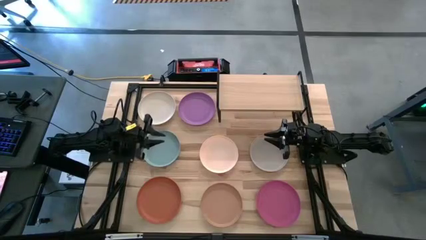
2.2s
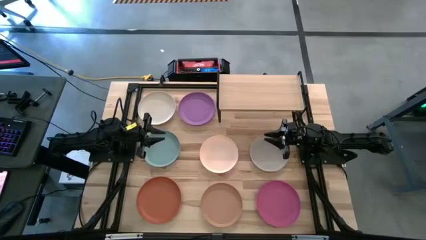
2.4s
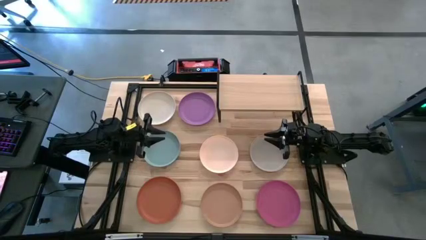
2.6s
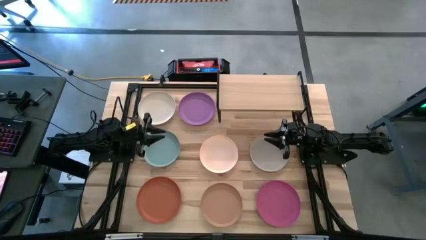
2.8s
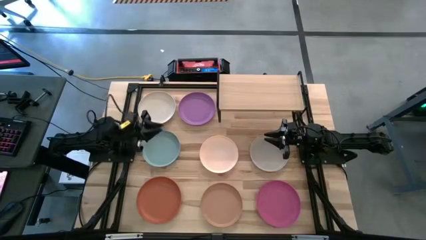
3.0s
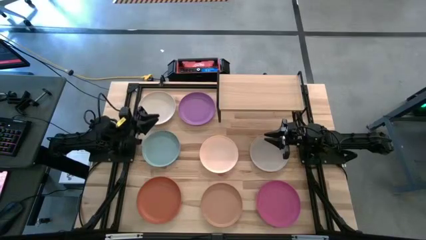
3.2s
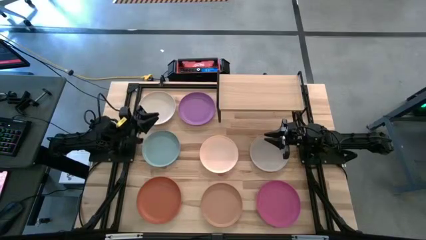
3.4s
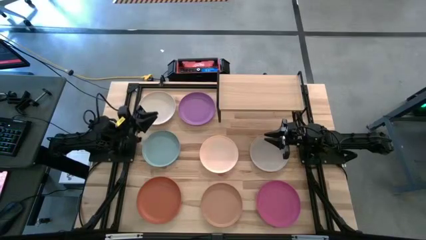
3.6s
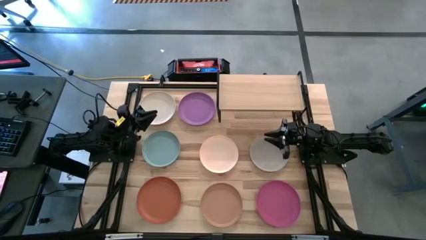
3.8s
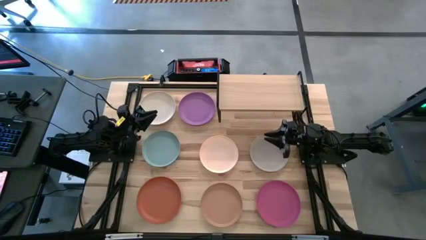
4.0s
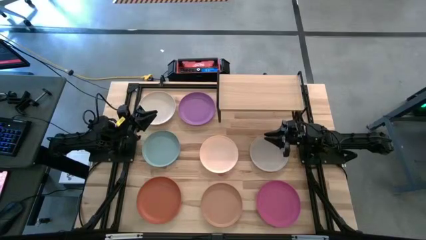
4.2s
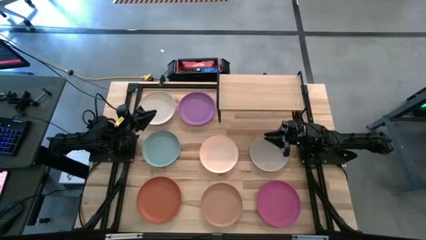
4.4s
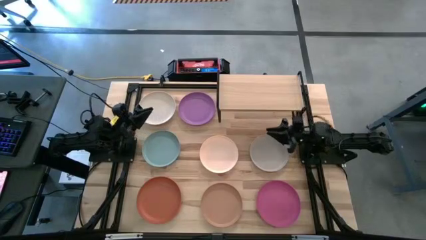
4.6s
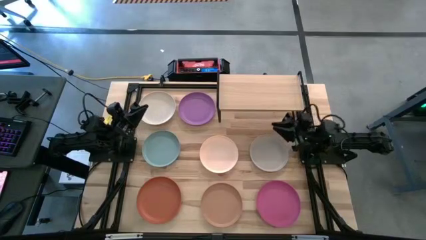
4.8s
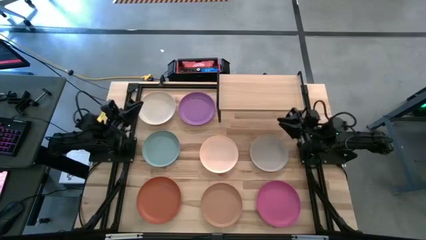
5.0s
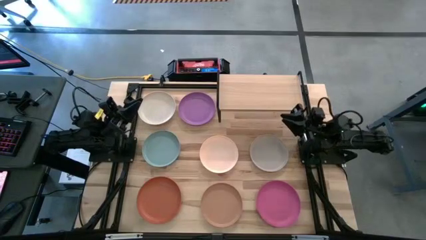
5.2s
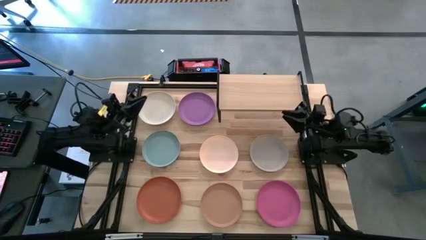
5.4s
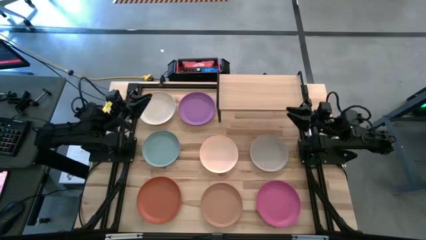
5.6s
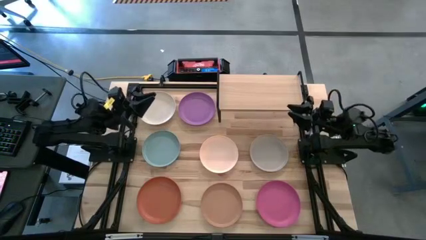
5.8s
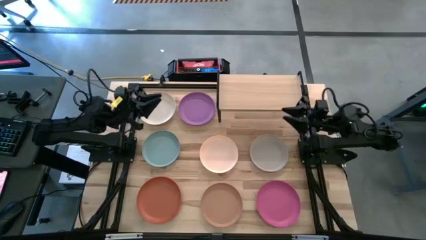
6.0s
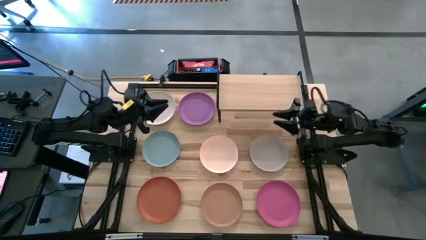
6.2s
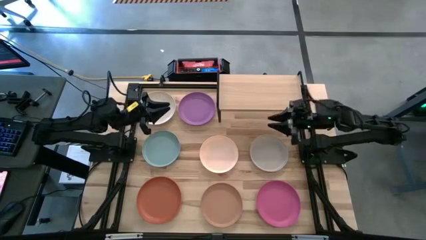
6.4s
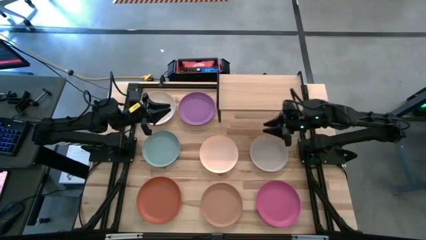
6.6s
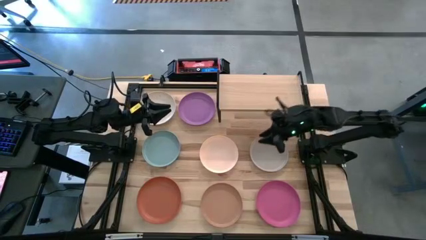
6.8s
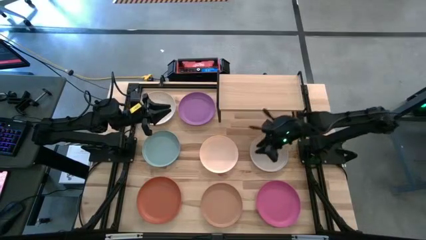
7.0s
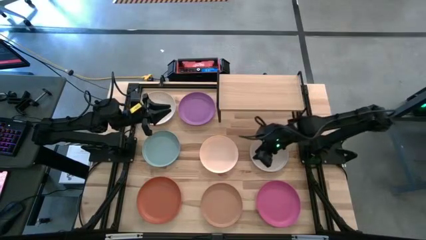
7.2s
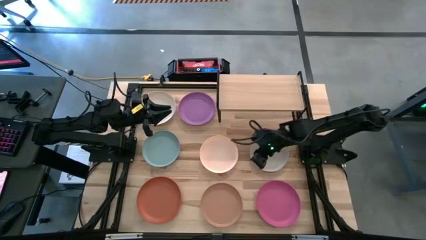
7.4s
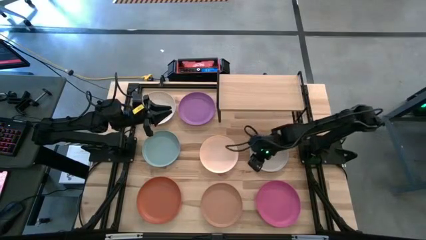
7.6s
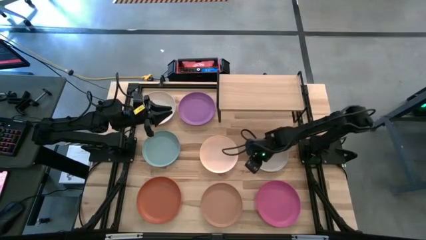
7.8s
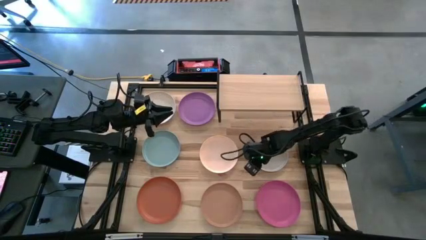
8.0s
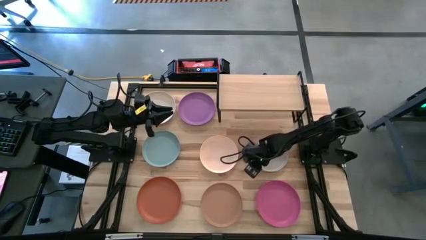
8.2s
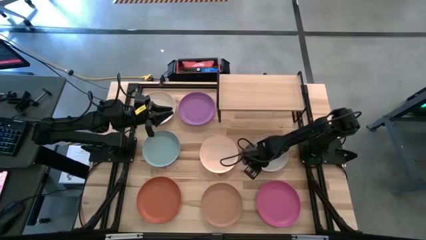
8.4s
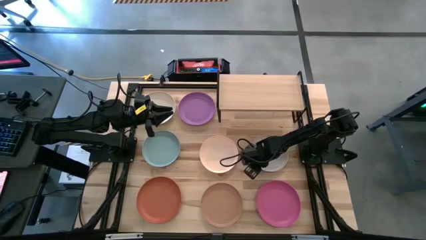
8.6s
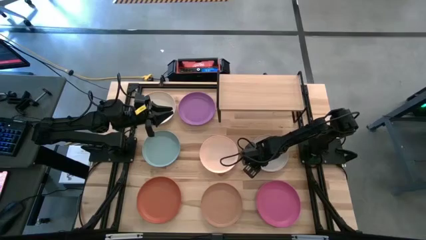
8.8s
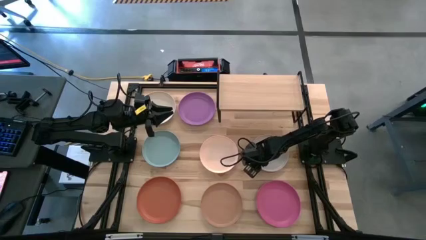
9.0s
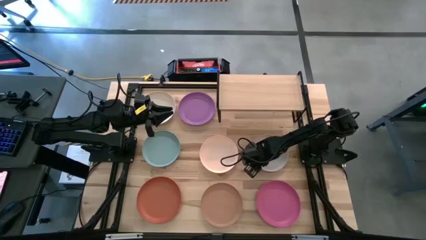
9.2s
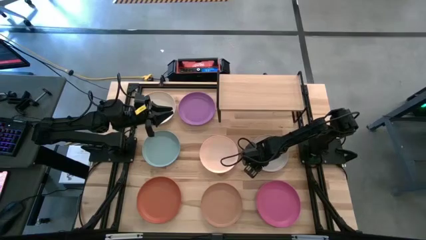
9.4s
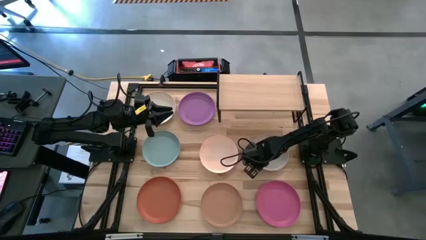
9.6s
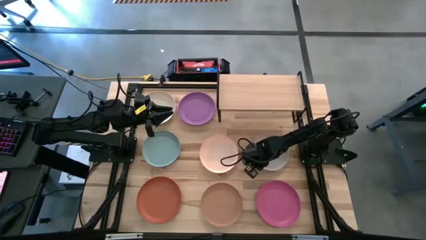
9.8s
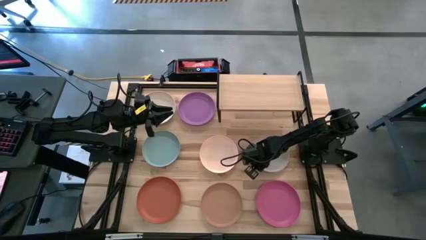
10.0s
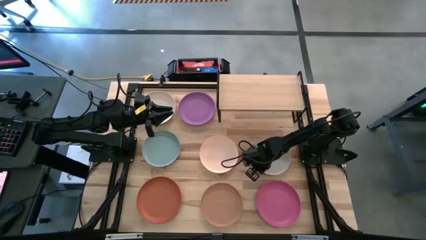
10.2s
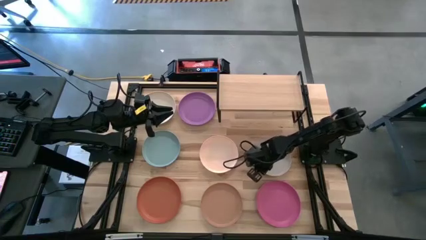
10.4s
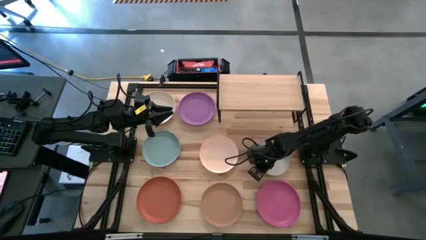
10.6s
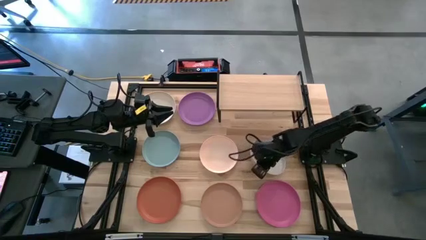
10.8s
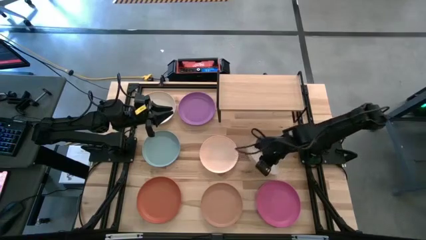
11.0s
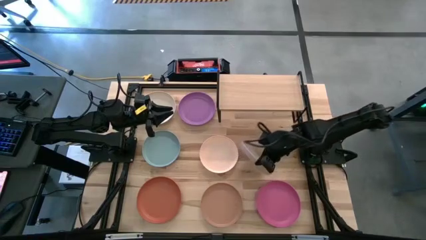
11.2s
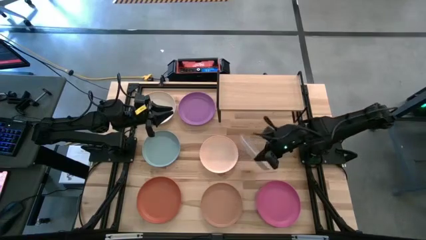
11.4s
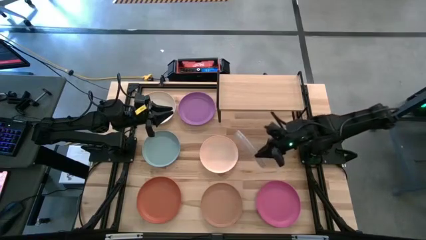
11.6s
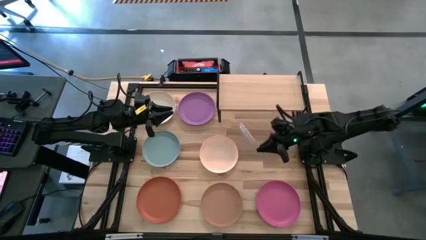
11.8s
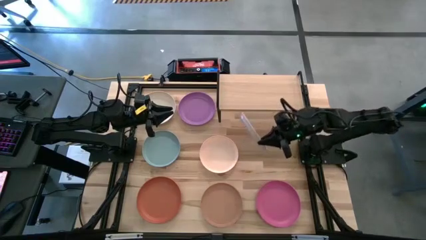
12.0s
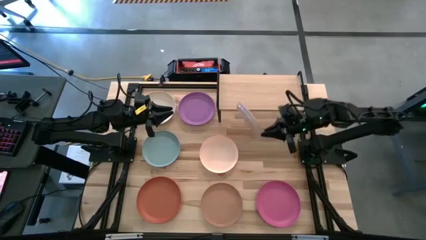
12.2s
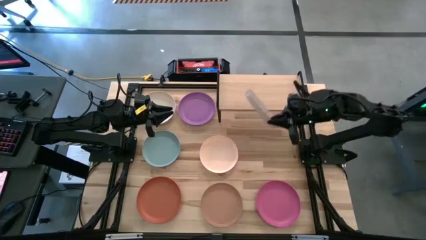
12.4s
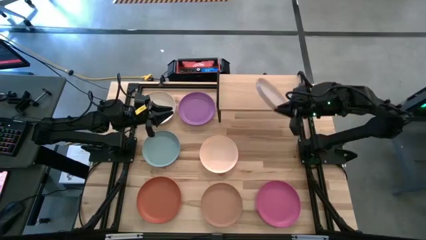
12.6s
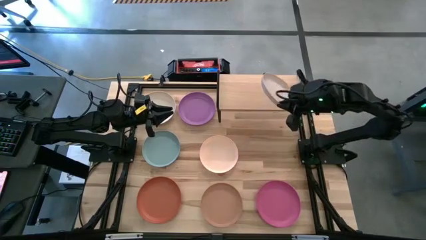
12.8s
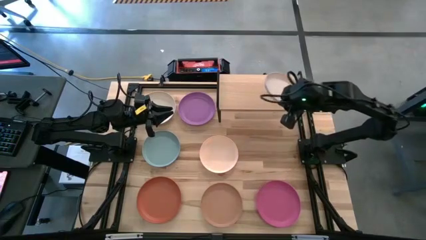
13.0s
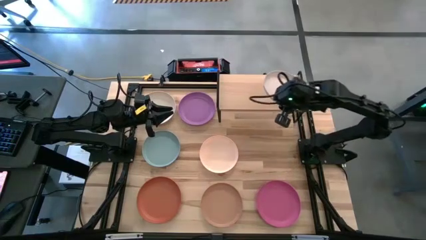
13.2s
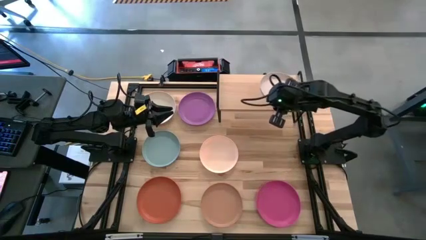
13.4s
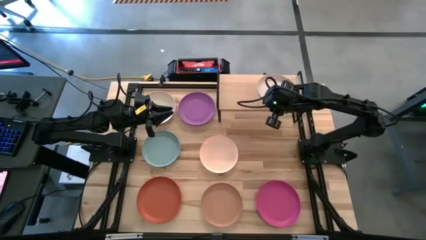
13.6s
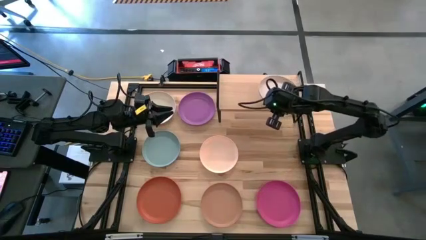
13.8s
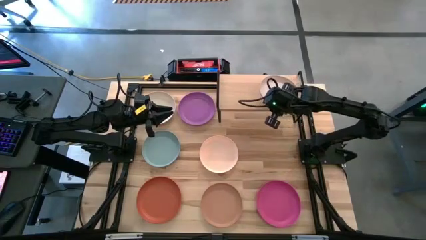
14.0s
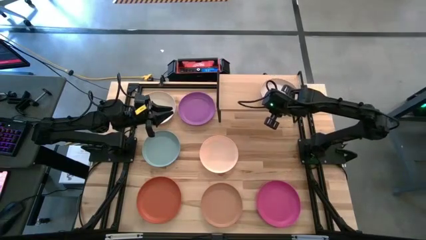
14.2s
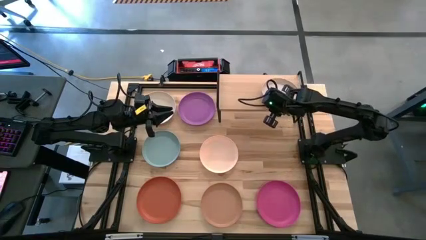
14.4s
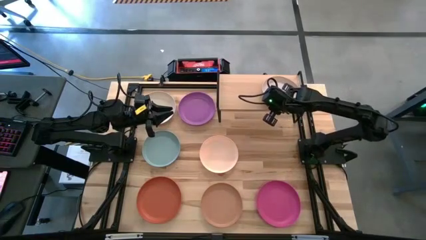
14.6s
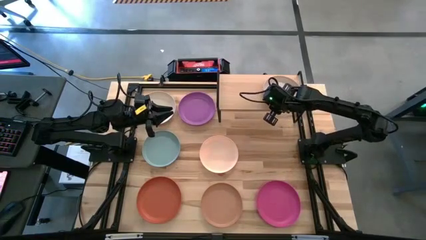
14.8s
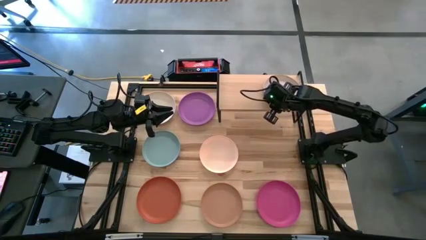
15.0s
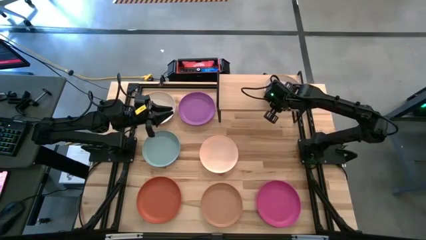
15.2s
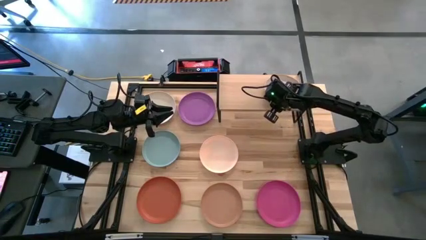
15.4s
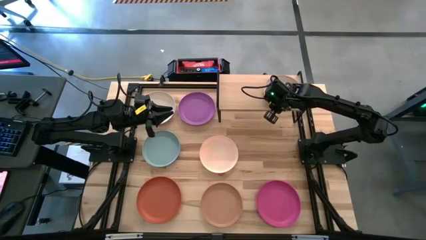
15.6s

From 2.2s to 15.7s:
Task: Place and stack plates onto a shelf
Put the gray plate on the shelf
